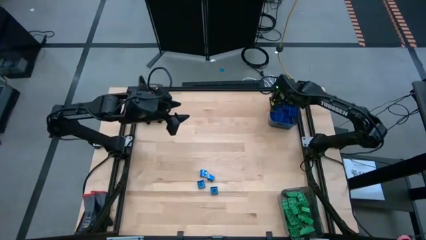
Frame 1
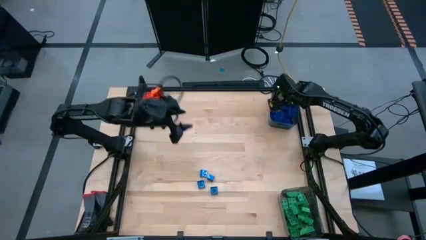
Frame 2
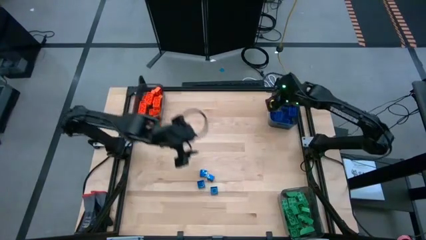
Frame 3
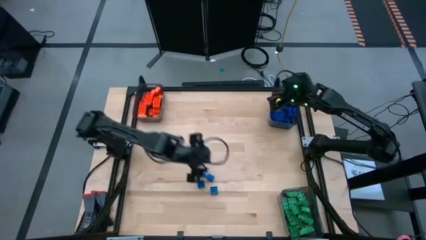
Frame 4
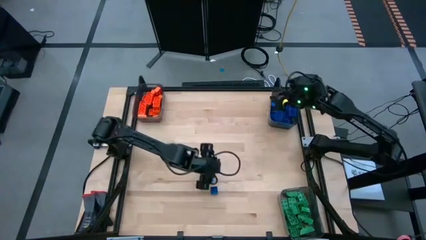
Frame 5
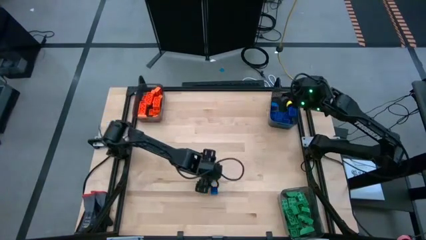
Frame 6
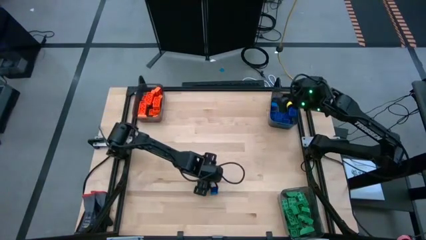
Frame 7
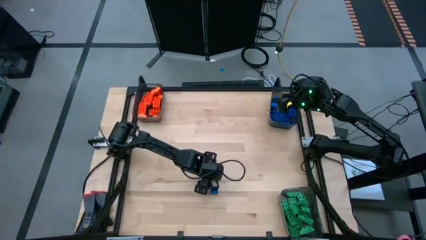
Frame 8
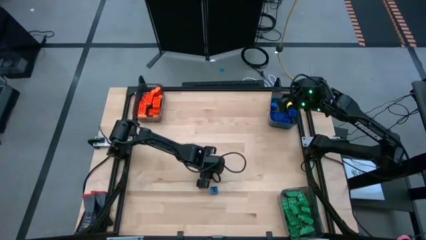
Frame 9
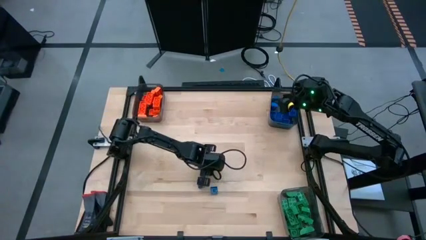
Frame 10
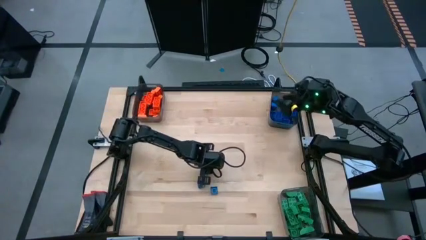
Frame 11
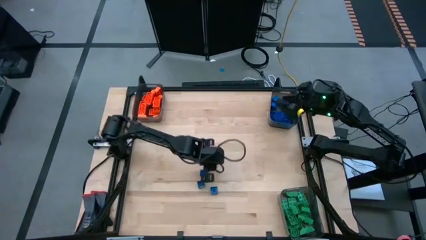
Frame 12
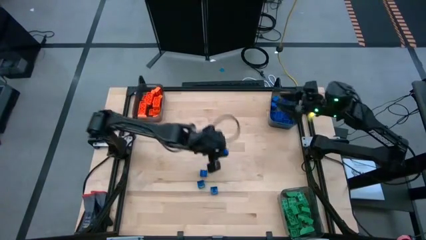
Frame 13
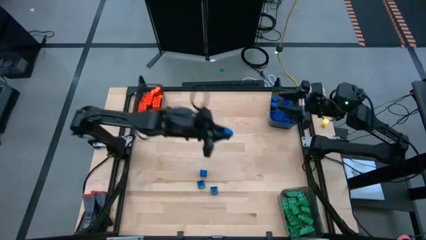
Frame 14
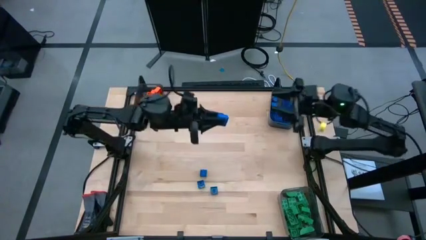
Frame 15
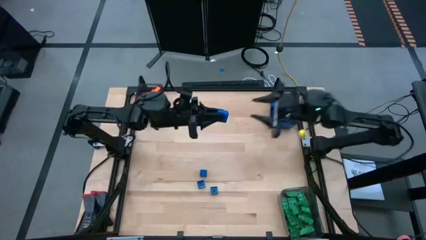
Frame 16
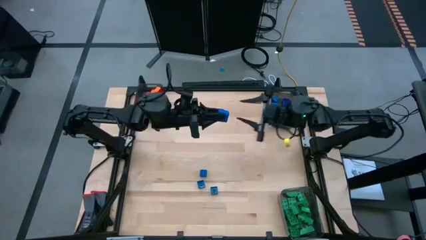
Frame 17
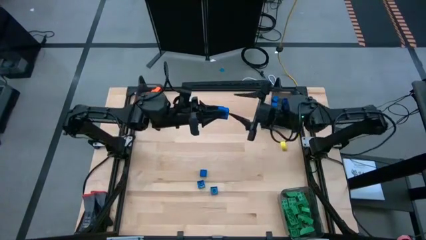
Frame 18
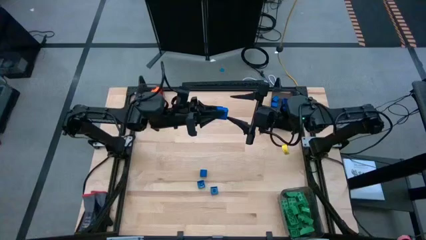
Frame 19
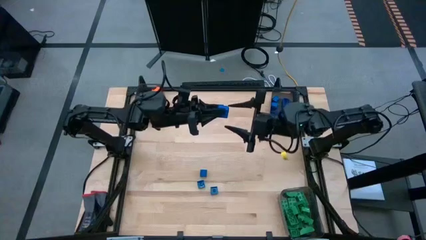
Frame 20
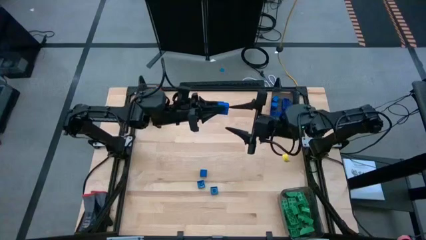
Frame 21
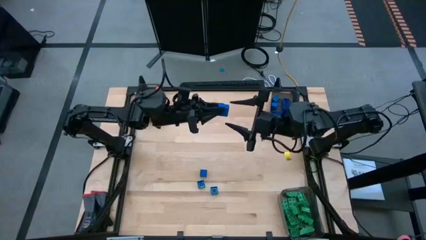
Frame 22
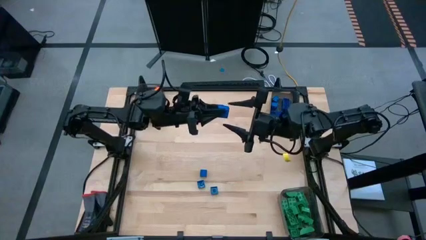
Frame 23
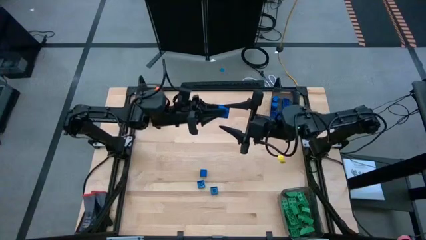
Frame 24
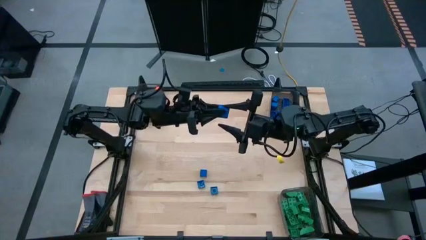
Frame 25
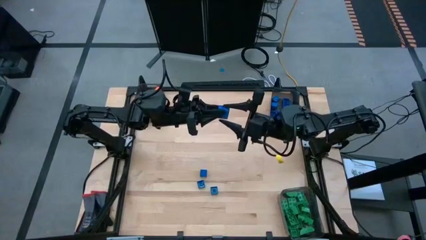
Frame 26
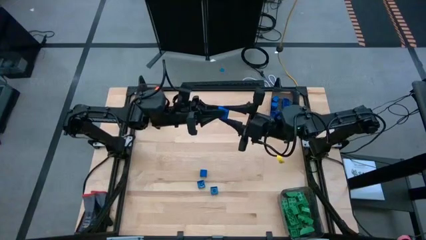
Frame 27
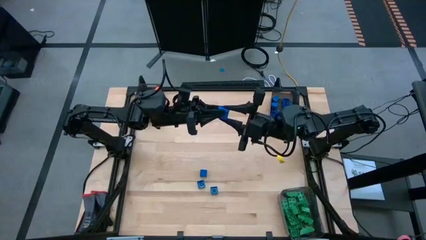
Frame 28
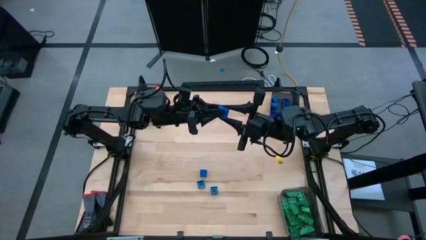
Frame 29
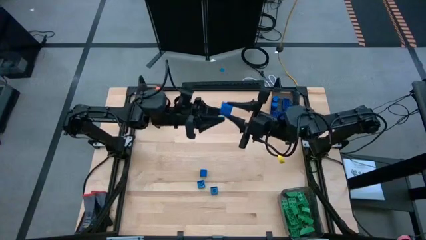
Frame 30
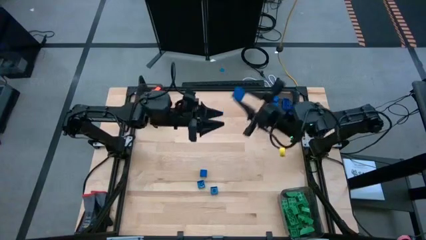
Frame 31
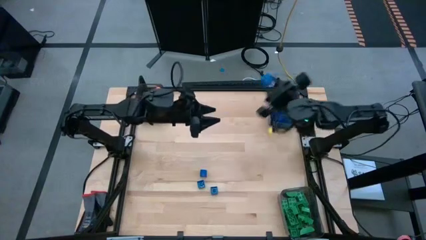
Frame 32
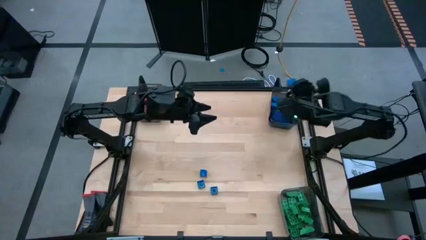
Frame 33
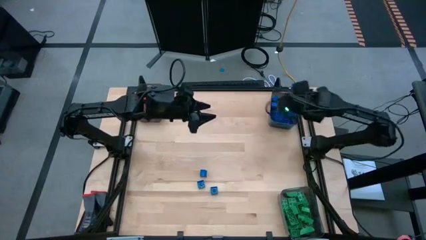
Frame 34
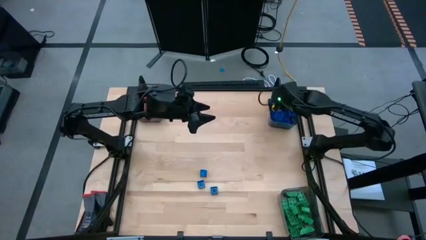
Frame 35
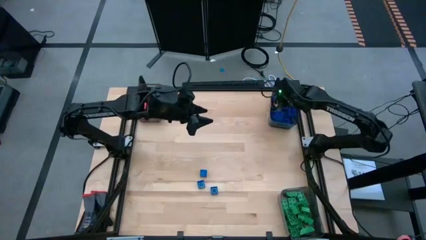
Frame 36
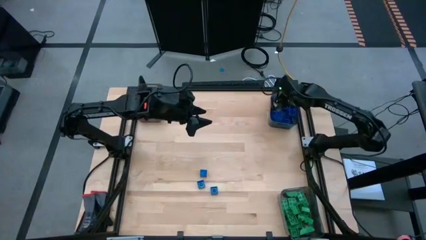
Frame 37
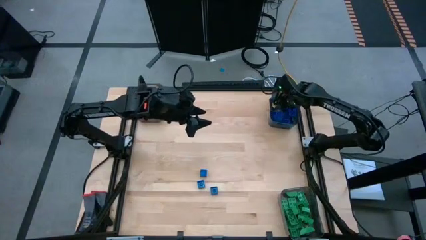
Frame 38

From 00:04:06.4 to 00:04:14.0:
Task: Sort blocks
Put the blue game piece into the top right black bin

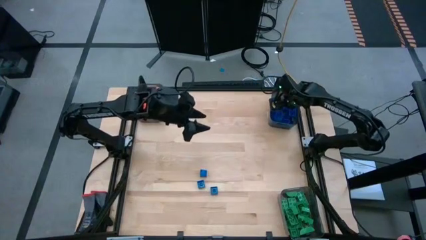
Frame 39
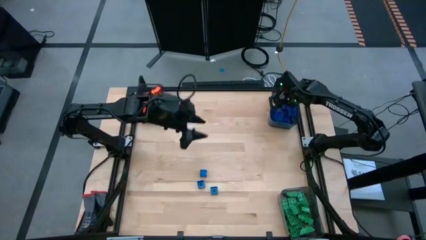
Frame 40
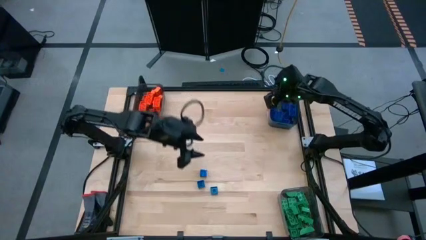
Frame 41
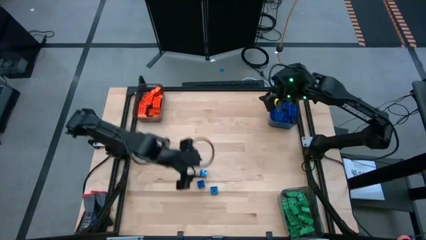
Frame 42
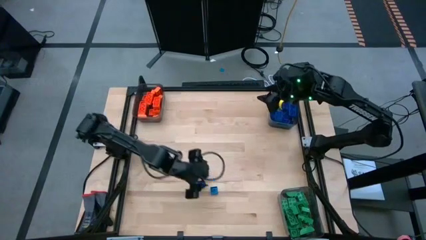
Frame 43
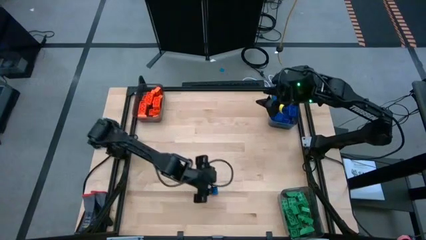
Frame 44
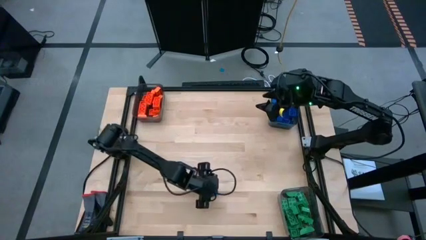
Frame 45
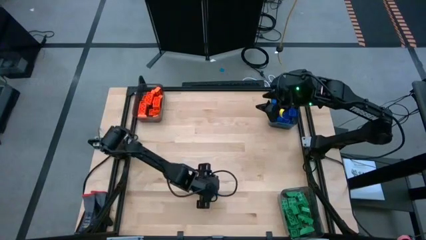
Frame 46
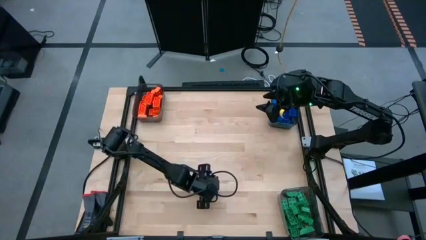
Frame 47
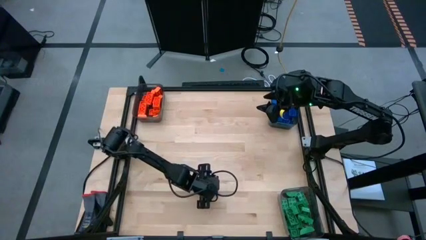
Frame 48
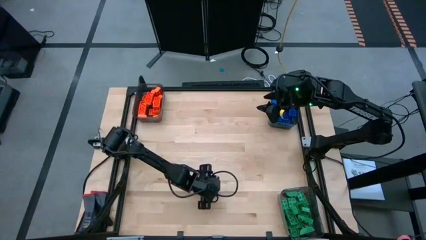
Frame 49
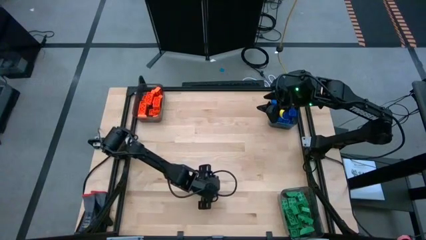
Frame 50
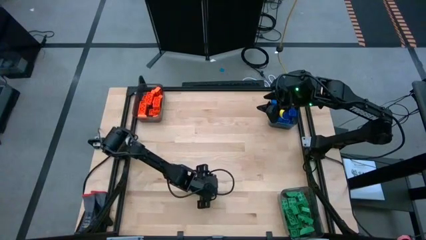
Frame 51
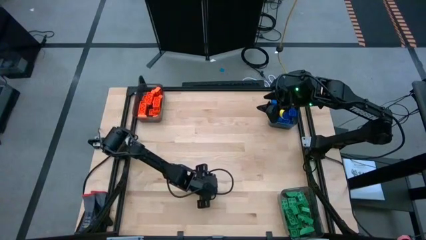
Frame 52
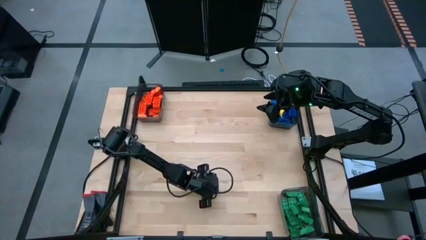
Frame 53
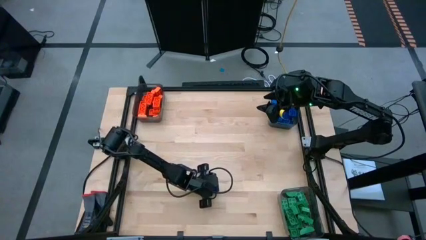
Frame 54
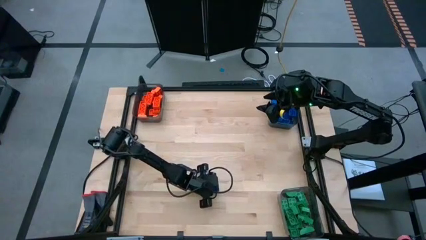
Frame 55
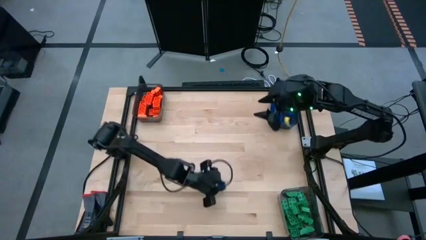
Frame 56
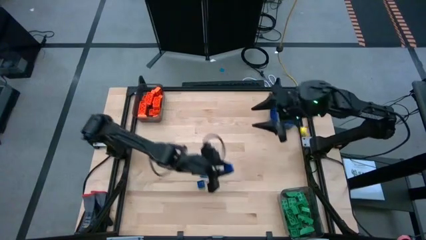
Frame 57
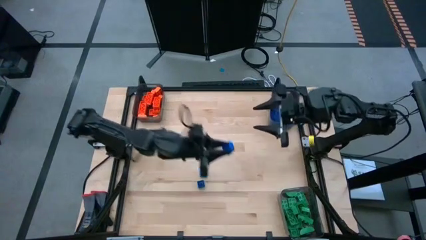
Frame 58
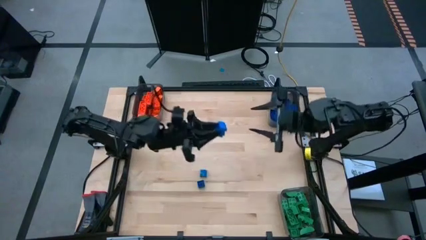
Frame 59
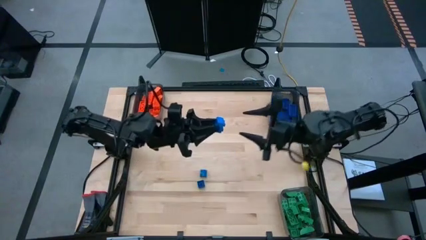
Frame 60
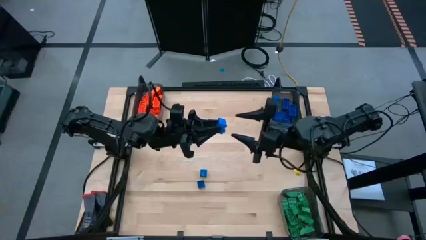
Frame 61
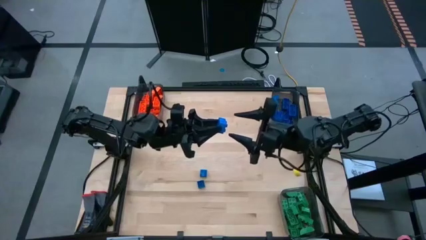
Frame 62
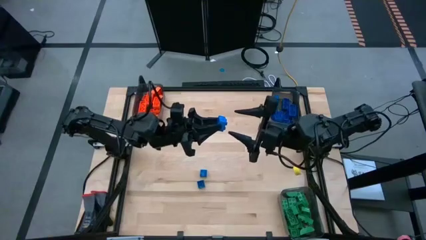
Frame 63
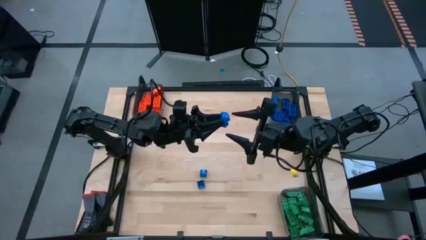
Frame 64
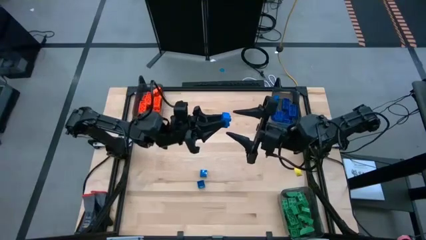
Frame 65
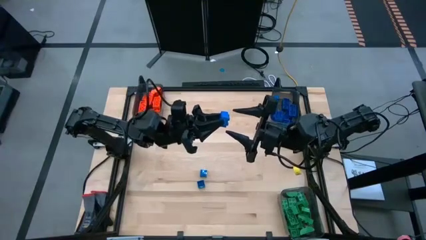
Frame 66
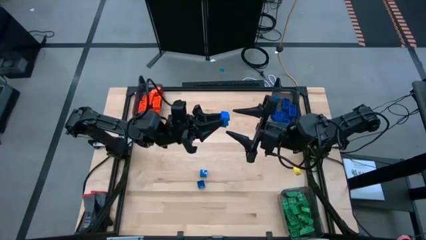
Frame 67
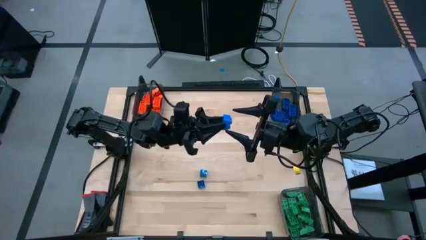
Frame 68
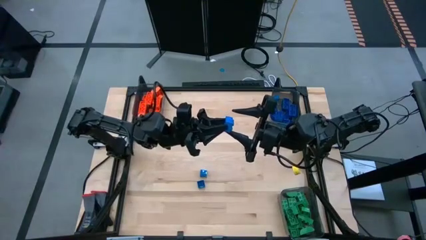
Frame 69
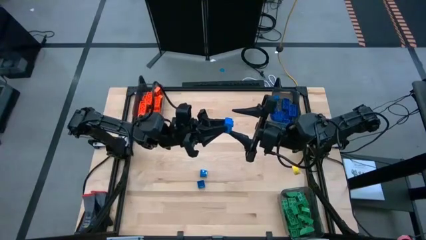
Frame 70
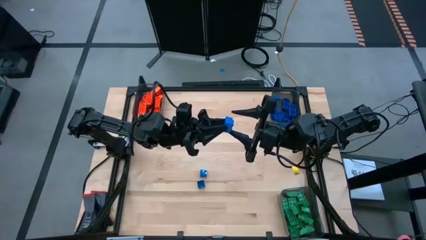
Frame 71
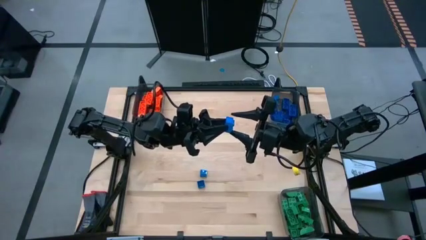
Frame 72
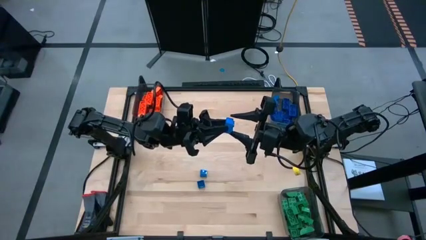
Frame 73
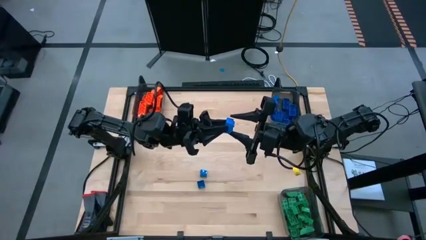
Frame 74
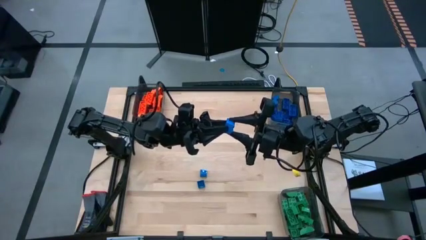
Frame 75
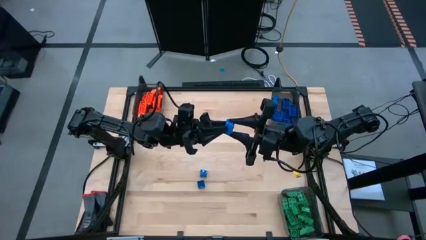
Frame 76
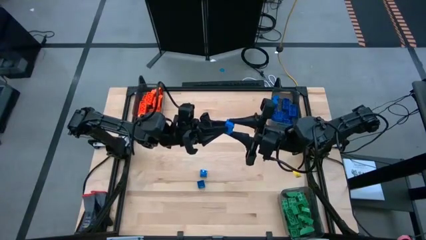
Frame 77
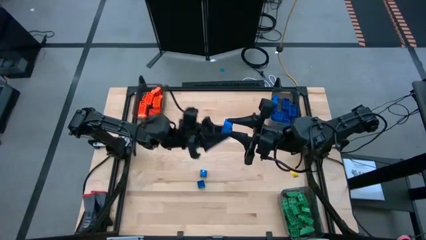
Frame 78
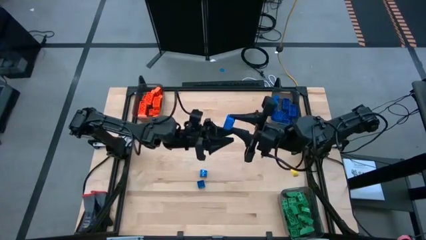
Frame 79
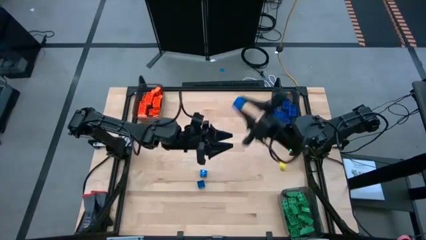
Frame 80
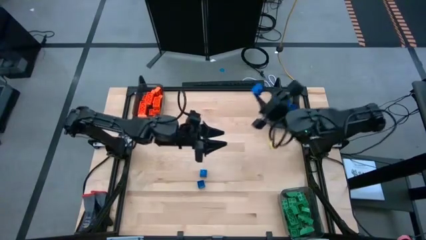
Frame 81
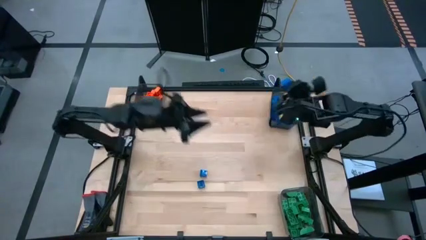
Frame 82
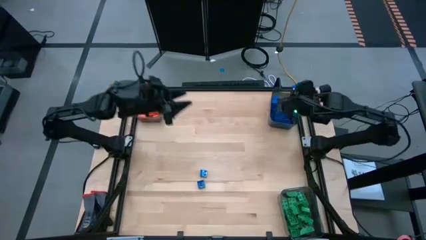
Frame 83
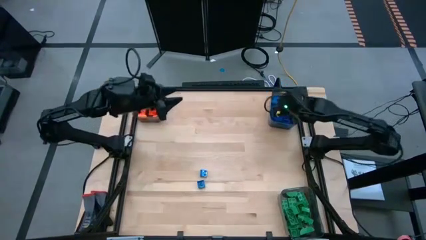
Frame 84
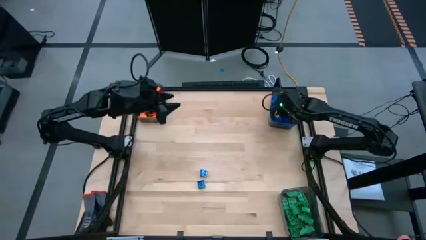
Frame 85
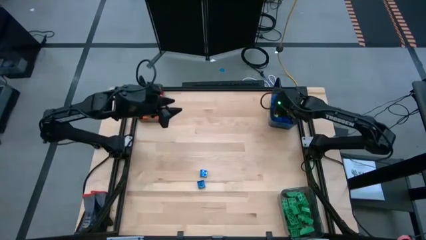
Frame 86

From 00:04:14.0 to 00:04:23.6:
Put the blue game piece into the top right black bin
